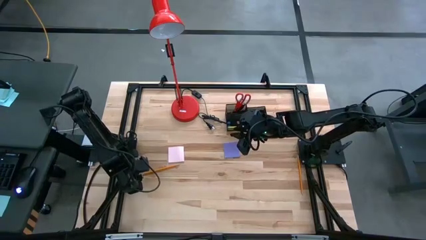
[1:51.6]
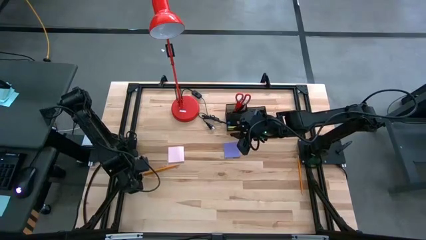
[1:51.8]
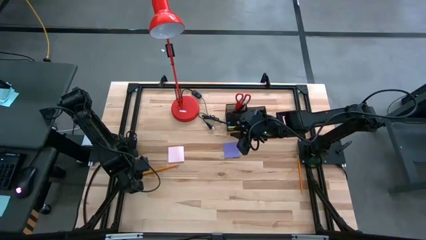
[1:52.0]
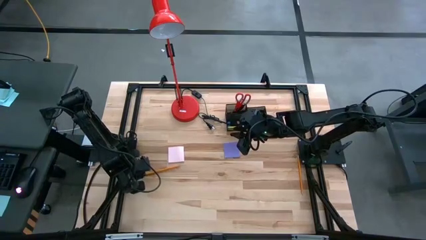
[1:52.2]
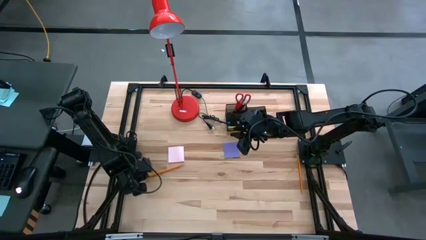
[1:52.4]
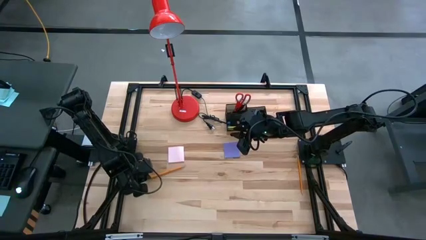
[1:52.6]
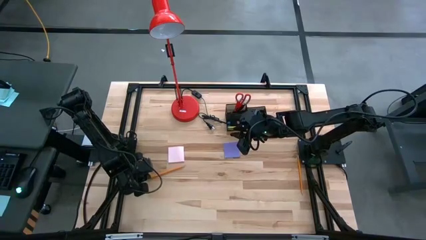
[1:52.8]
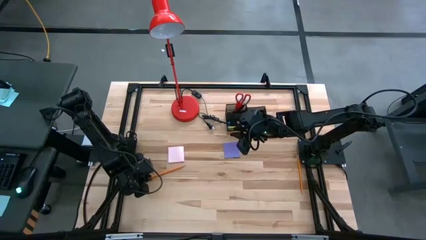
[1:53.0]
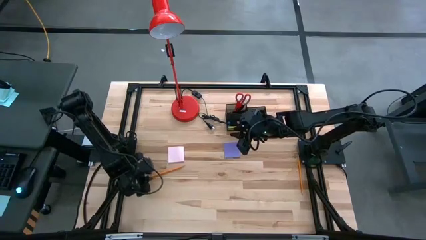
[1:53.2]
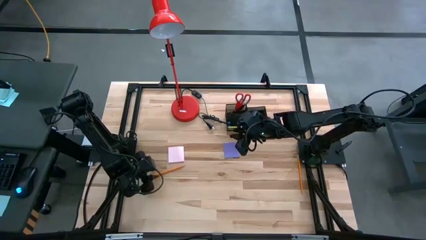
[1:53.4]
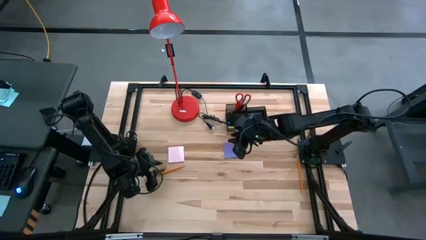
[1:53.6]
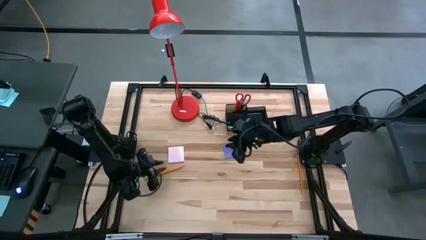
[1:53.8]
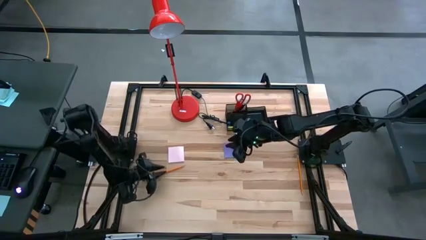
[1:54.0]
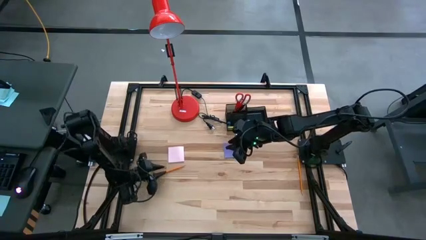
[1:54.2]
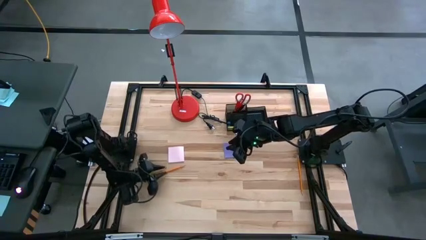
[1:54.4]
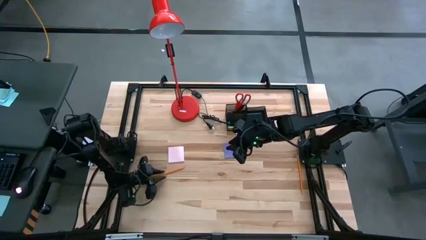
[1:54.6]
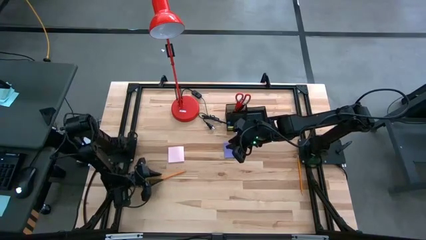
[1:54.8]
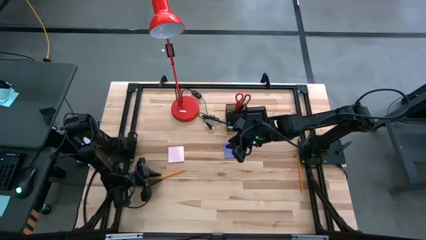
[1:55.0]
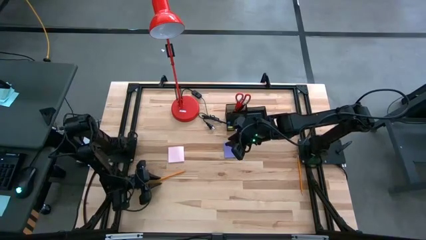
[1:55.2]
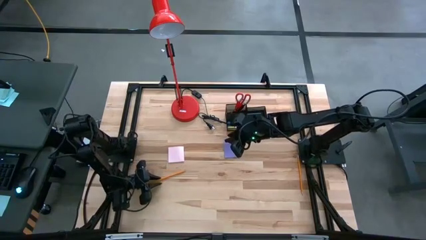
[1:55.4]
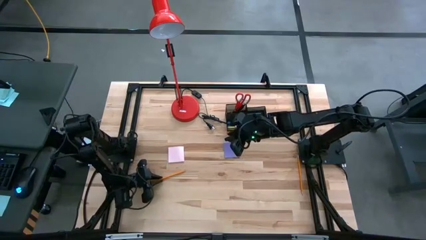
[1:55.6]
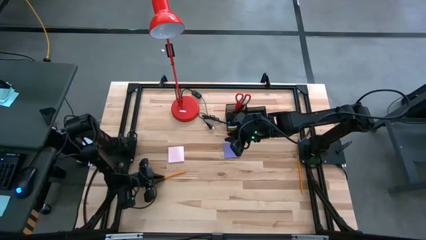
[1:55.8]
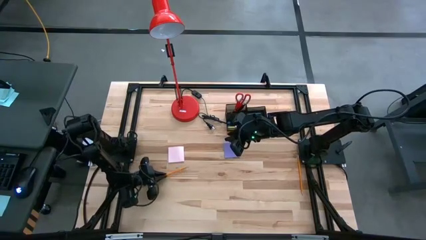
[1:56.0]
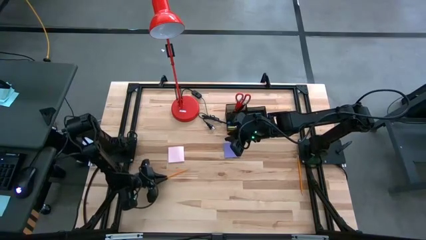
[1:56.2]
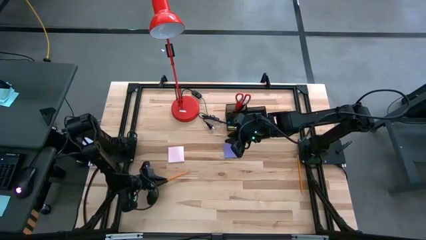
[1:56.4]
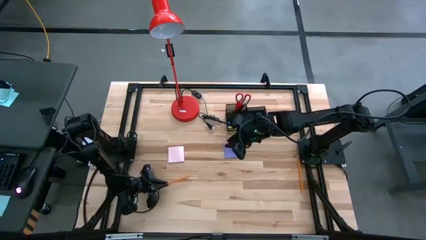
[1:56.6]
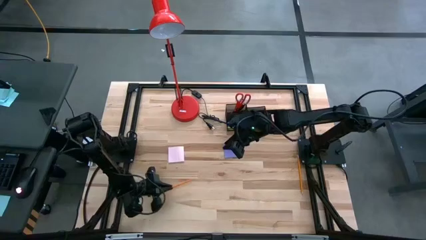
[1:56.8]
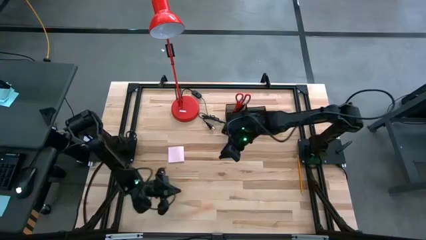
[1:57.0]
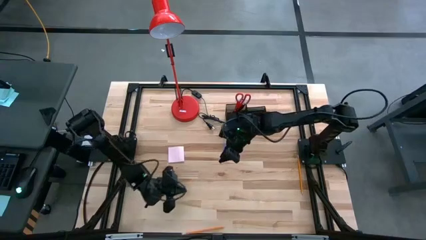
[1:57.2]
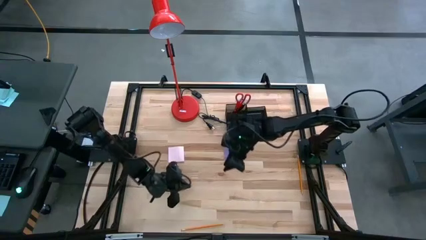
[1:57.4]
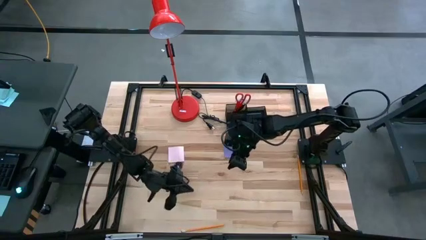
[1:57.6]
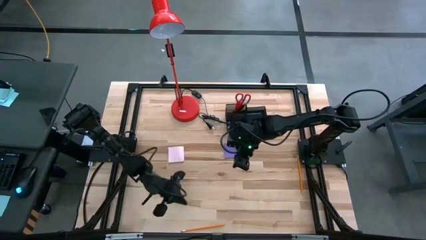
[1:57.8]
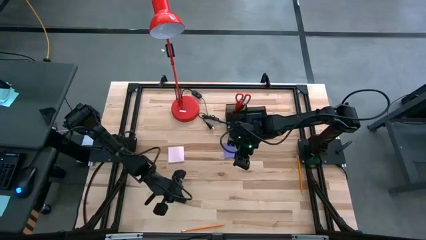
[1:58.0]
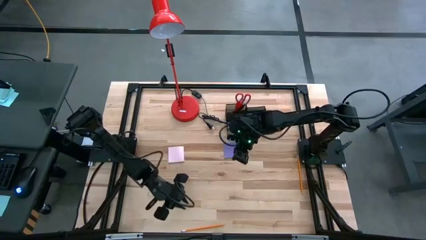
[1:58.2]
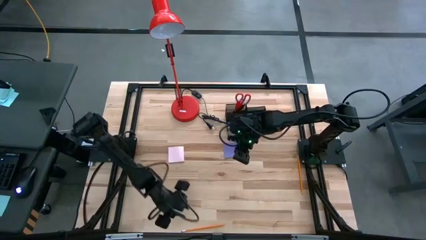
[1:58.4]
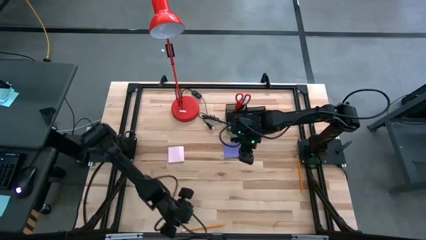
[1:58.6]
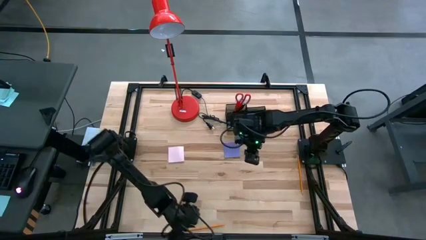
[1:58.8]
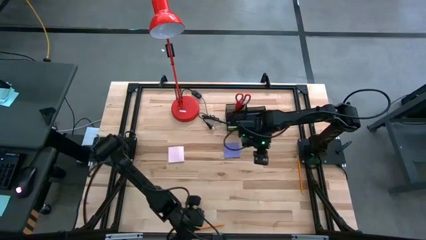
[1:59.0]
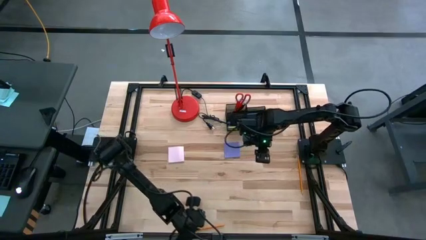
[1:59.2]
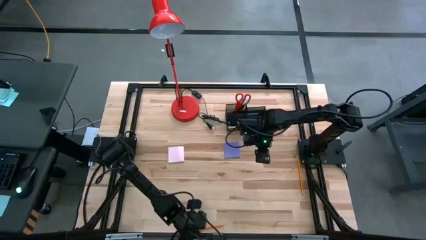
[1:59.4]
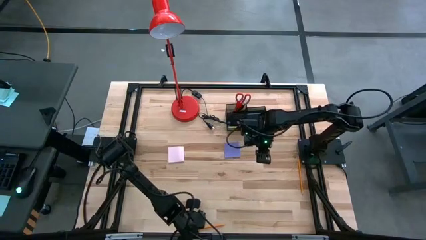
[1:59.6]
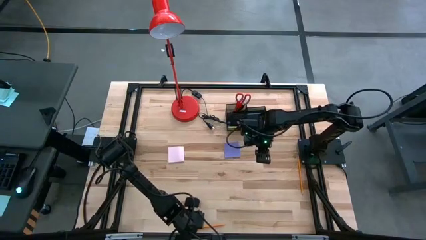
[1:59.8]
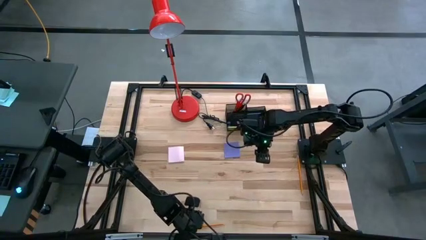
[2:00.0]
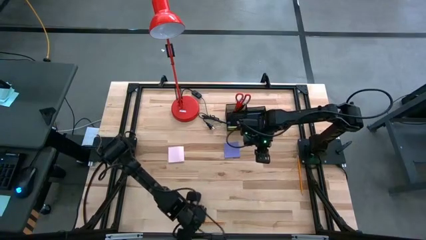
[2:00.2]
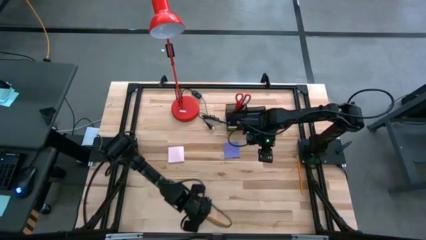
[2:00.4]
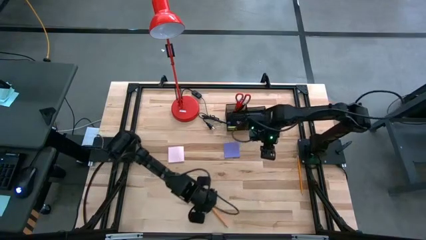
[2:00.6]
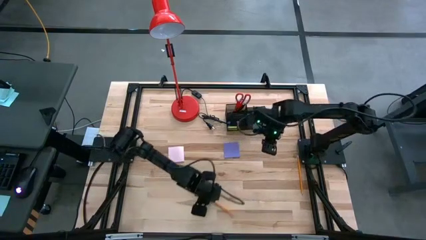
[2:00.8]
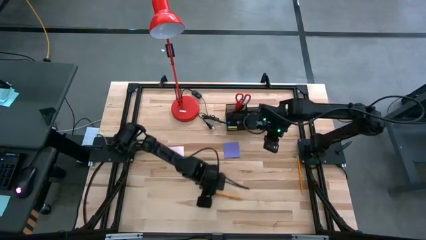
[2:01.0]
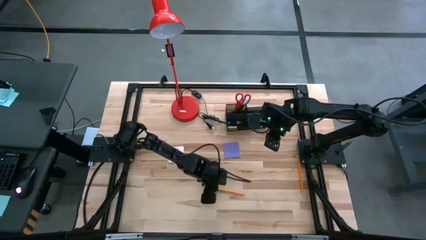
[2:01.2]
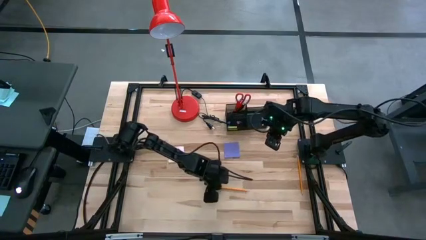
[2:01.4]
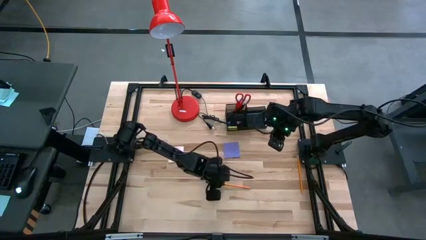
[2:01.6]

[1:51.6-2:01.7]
Task: Pick and place office supplies into organizer
Put the left orange pencil into the black desk organizer
